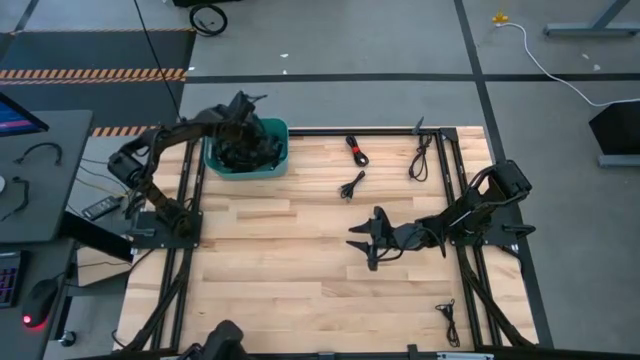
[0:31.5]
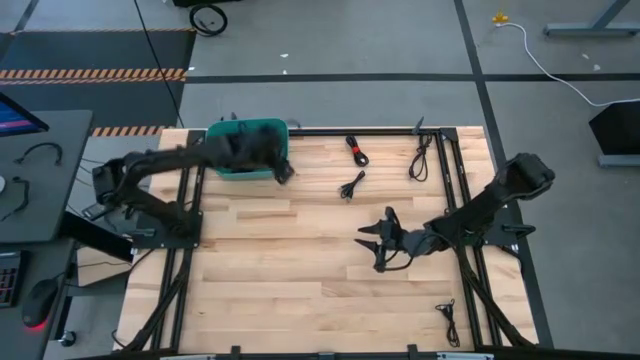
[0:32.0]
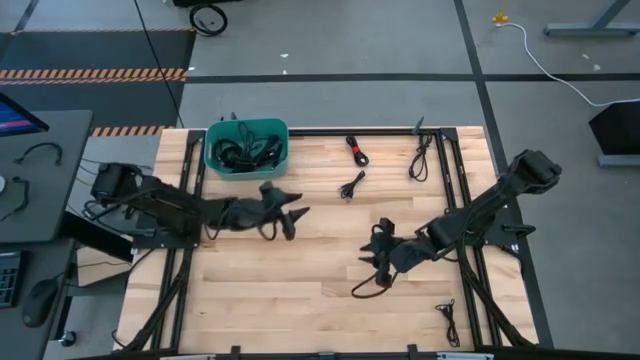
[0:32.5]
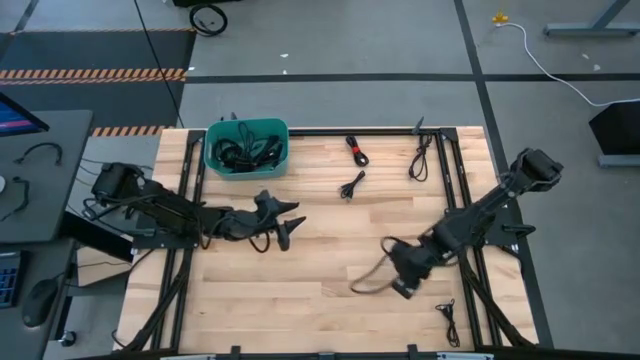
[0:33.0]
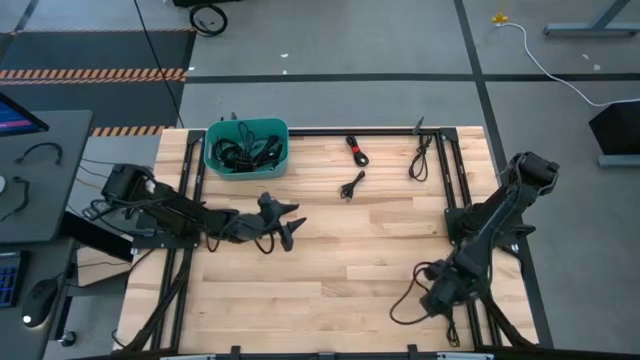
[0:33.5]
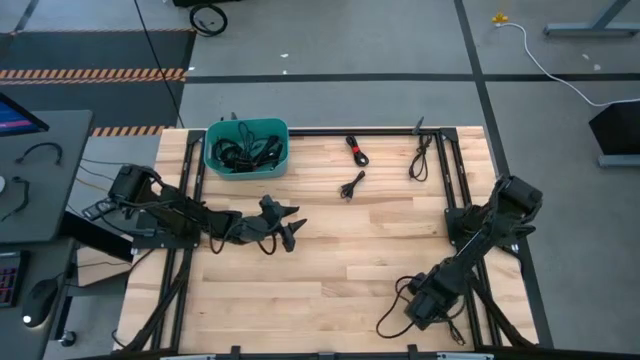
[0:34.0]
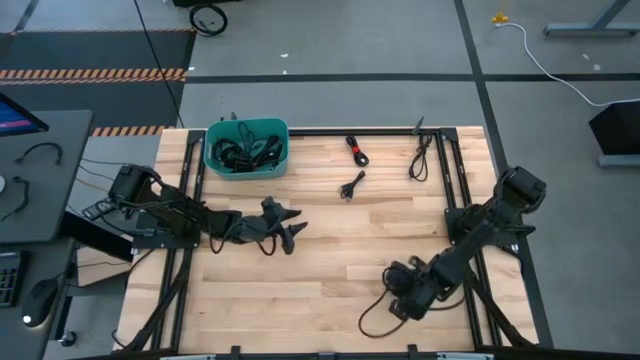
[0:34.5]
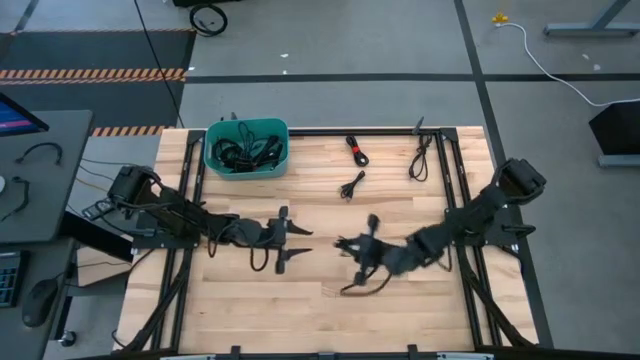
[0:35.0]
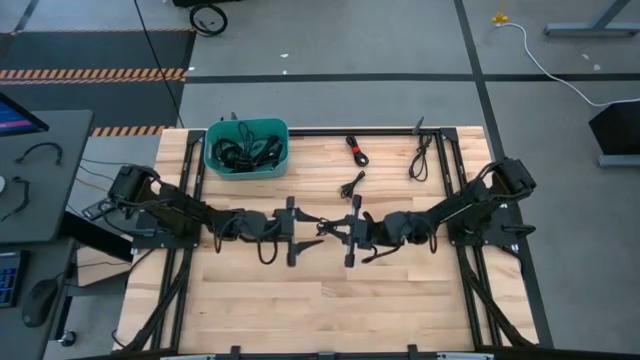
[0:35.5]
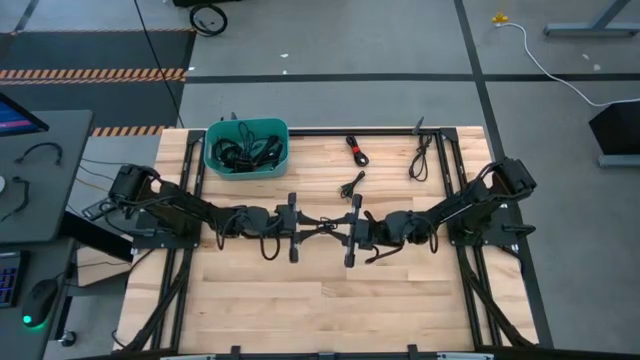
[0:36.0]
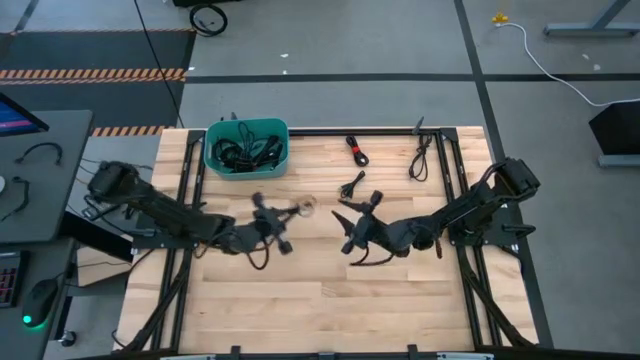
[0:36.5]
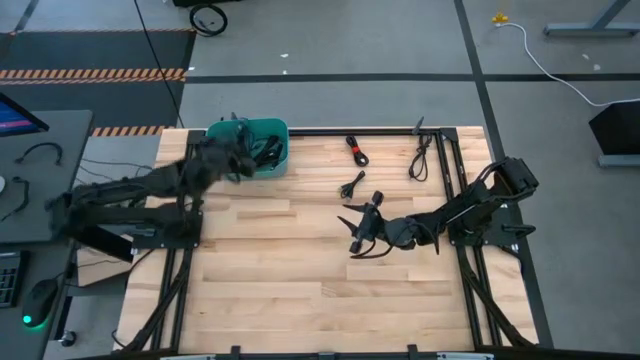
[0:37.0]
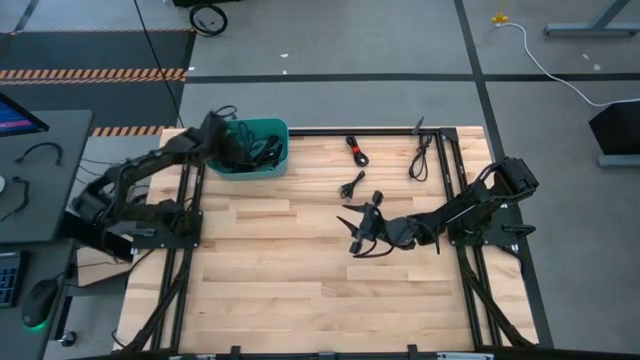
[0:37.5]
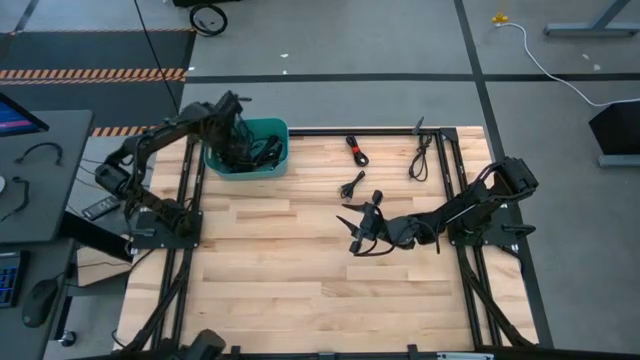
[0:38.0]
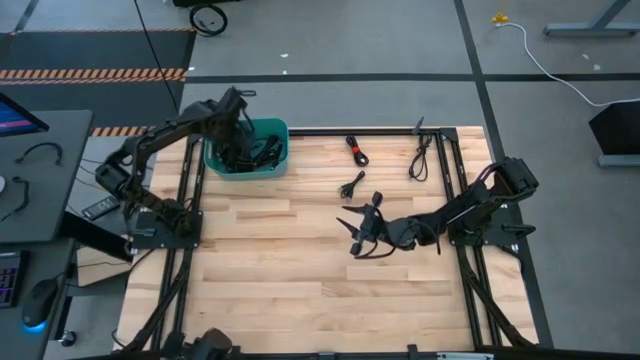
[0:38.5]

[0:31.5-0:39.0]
Task: Pick and place USB-C Cables
Put the black charger cable into the blue bin

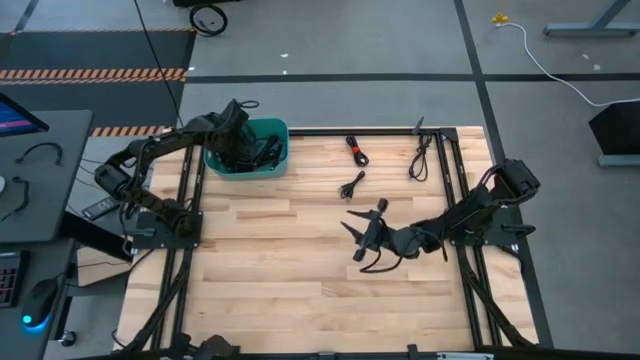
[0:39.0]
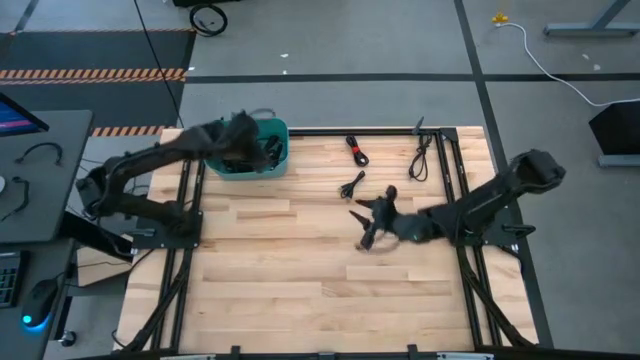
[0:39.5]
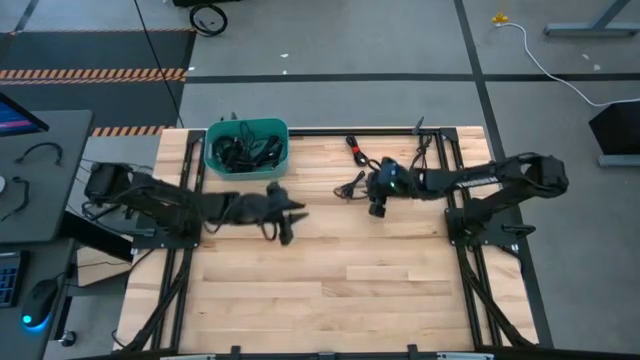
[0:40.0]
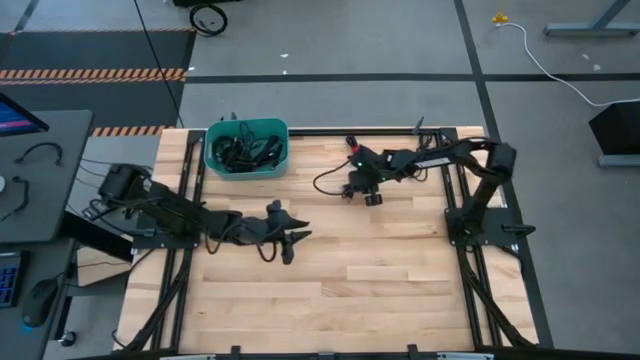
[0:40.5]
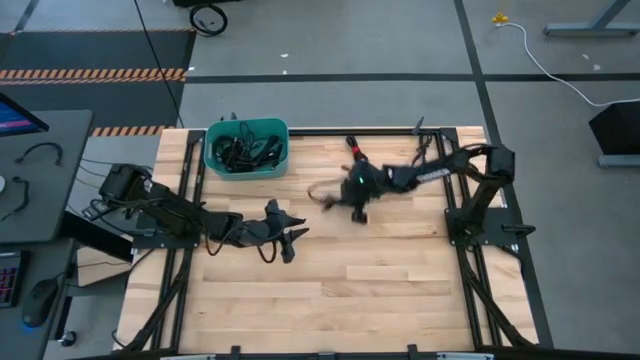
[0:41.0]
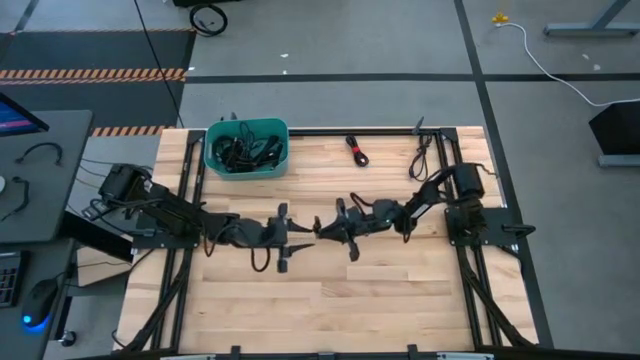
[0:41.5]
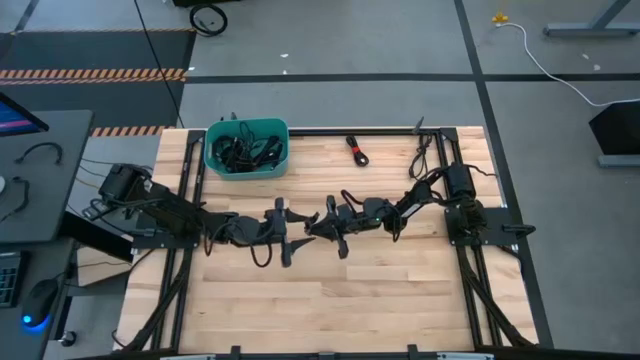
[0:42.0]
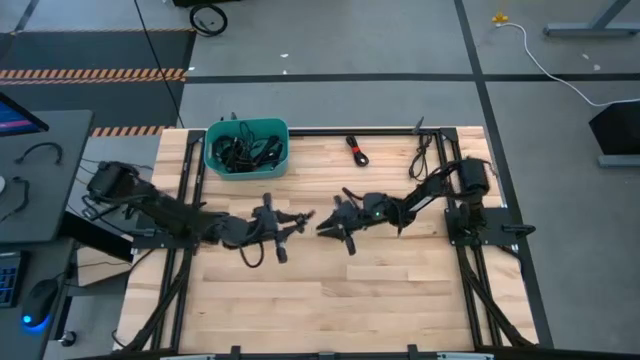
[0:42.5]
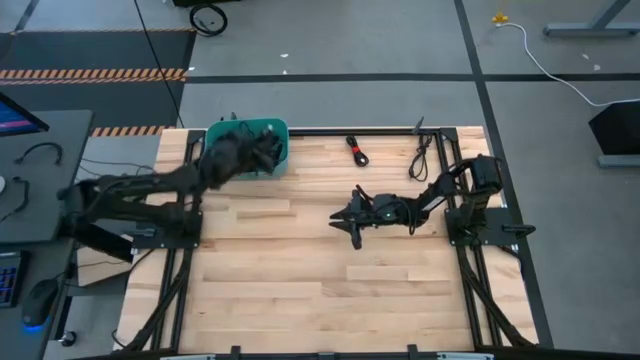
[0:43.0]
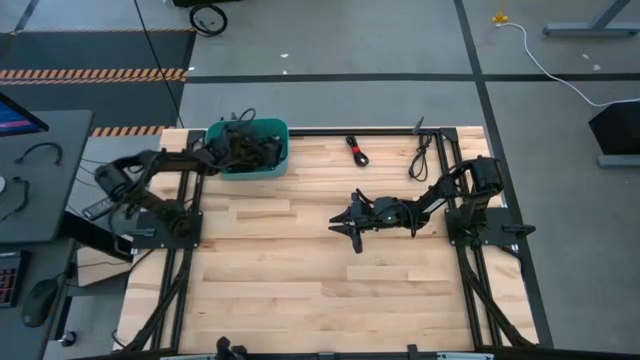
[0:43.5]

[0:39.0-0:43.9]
Put the black charger cable into the blue bin

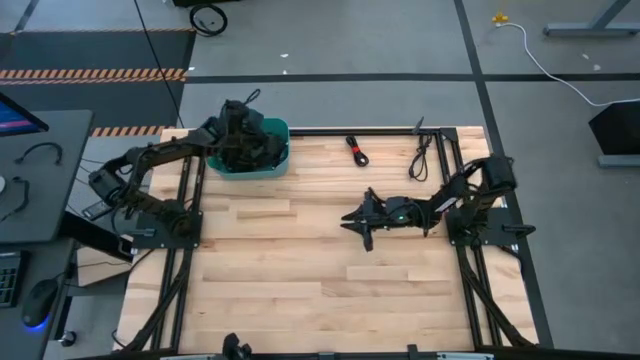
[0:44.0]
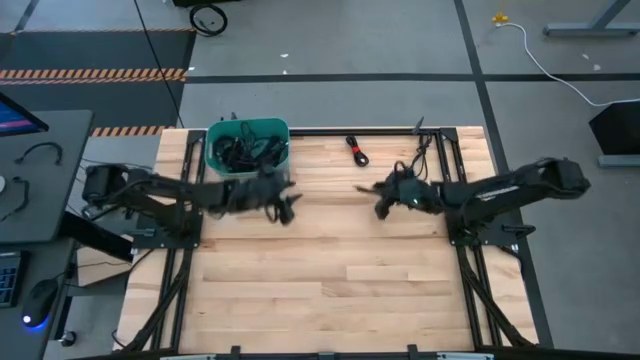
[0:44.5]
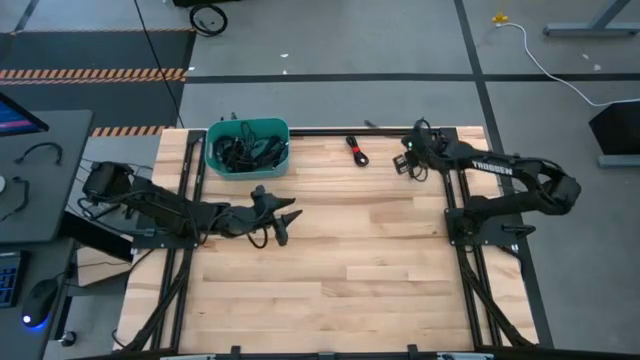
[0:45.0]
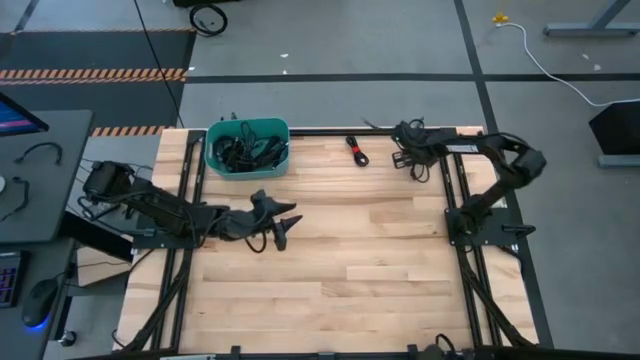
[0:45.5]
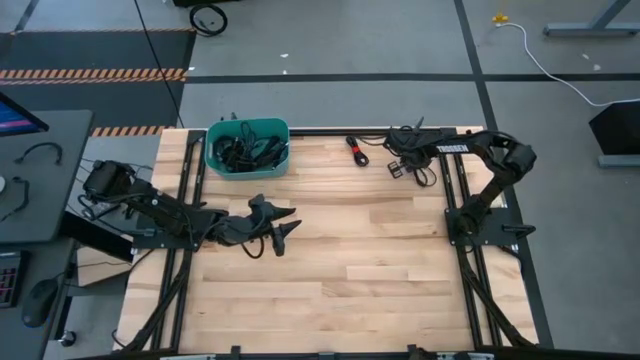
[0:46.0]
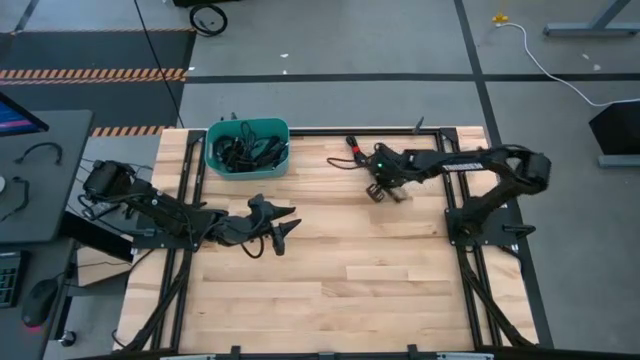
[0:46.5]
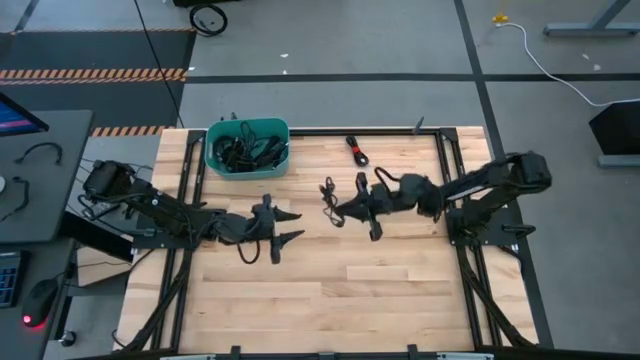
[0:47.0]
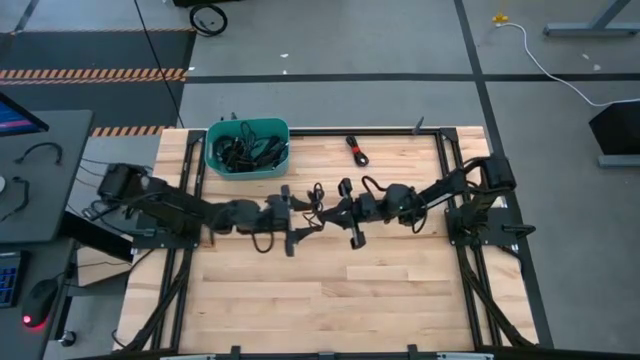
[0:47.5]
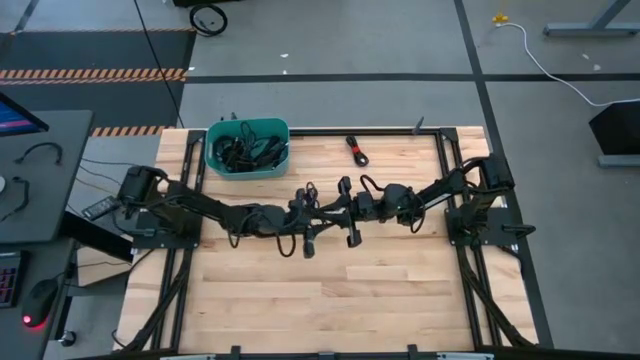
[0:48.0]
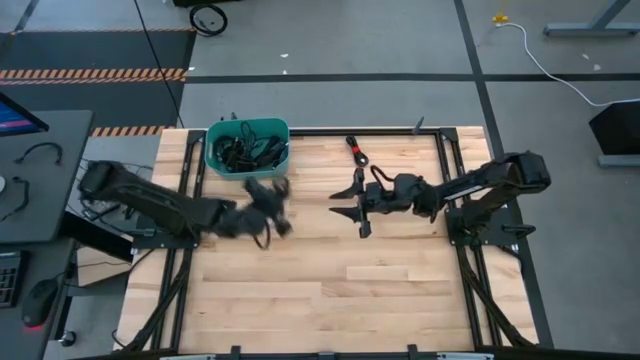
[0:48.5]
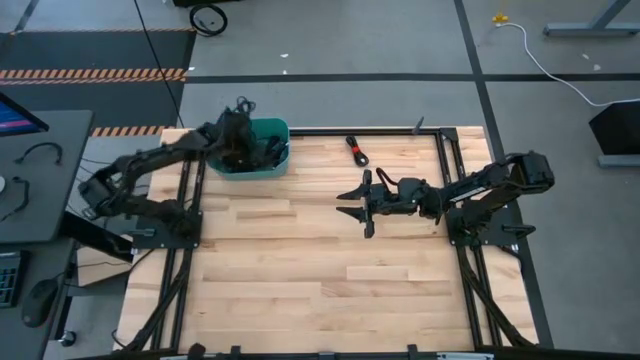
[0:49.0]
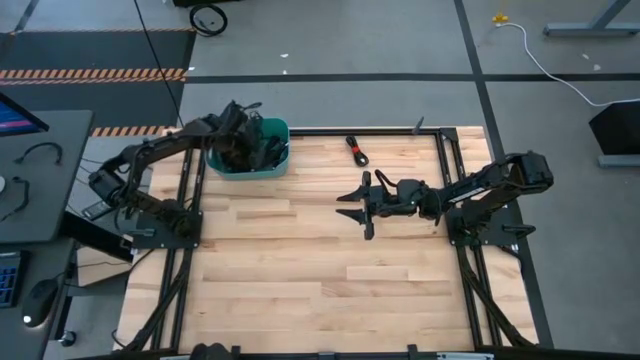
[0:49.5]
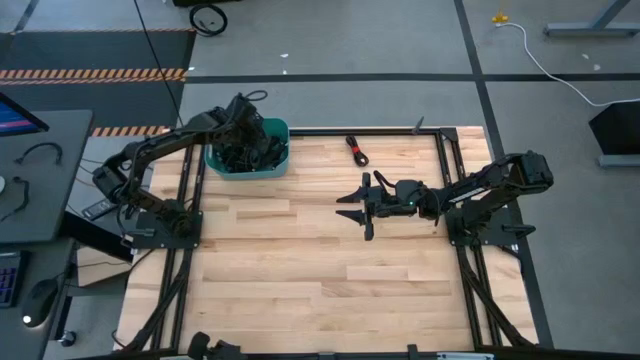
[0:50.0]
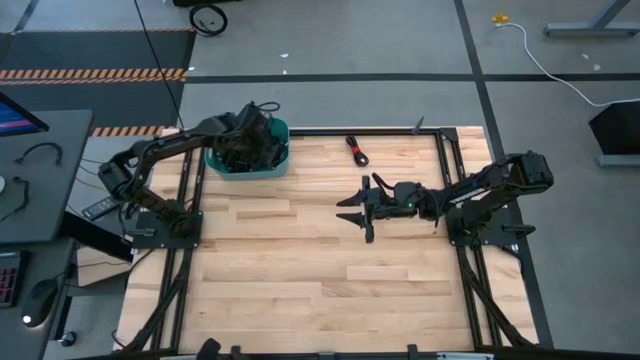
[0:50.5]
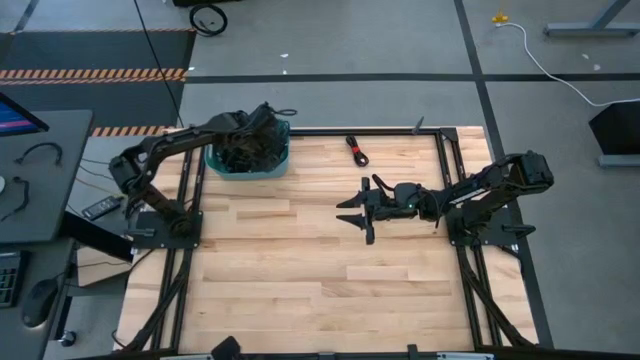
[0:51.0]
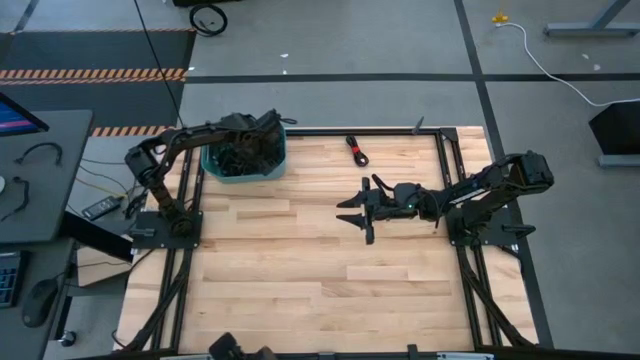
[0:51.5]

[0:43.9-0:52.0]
Put the black charger cable into the blue bin

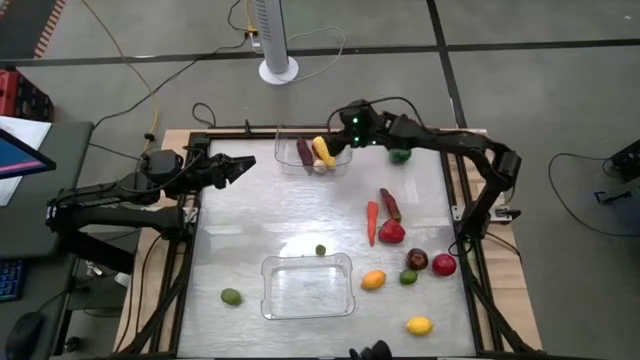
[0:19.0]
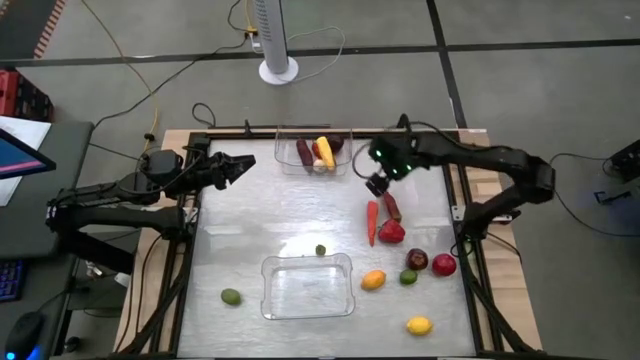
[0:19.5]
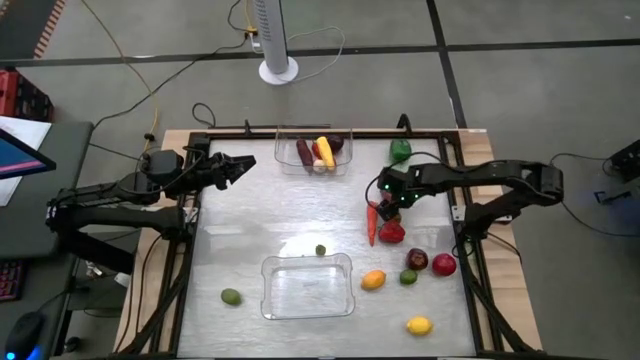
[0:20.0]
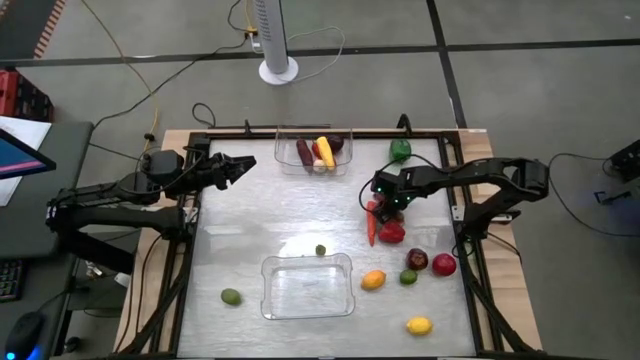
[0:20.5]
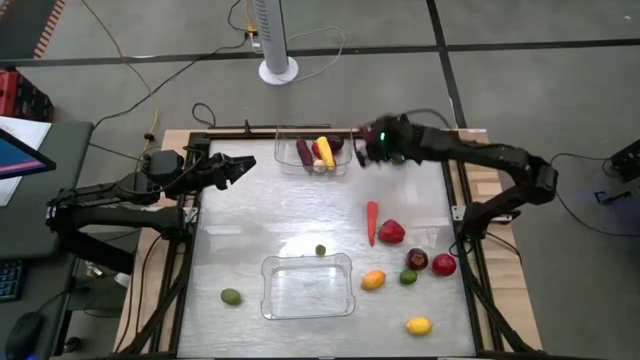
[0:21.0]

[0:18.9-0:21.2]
Task: Sort produce into baskets
Put the dark red chili pepper into the top transparent bin
